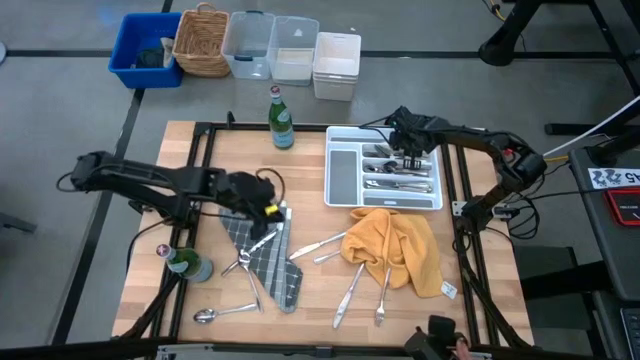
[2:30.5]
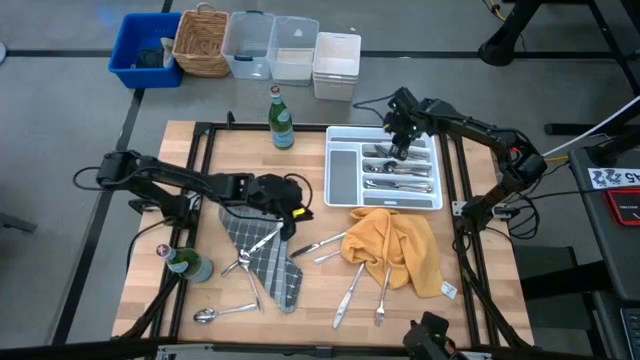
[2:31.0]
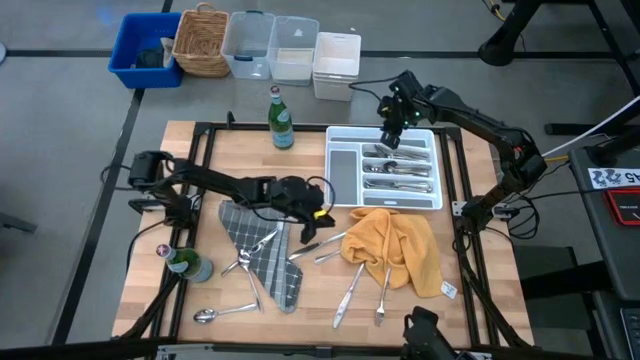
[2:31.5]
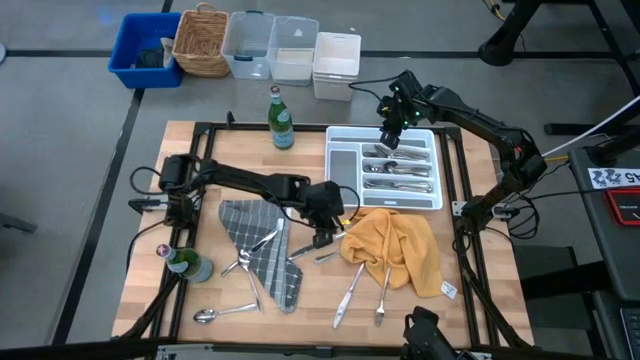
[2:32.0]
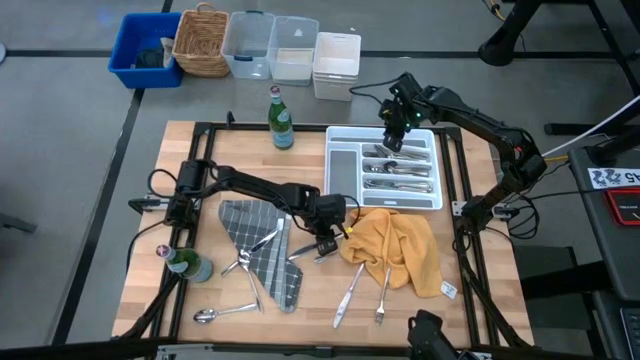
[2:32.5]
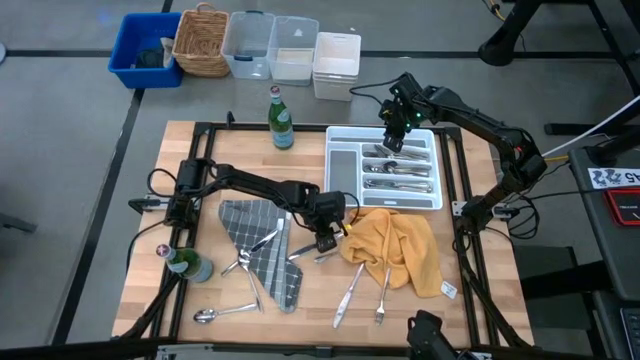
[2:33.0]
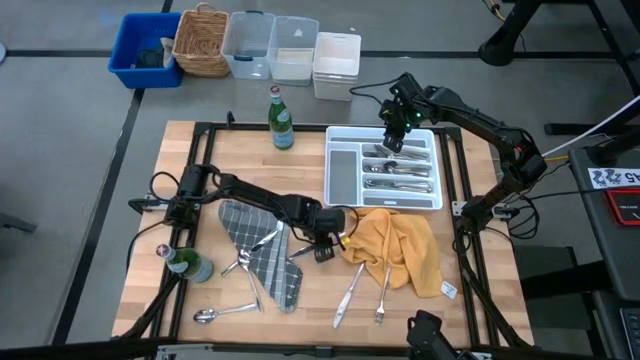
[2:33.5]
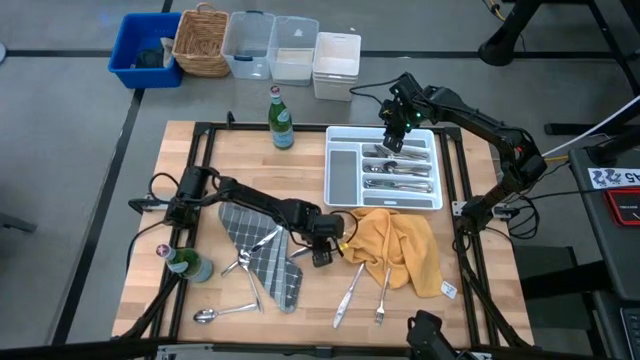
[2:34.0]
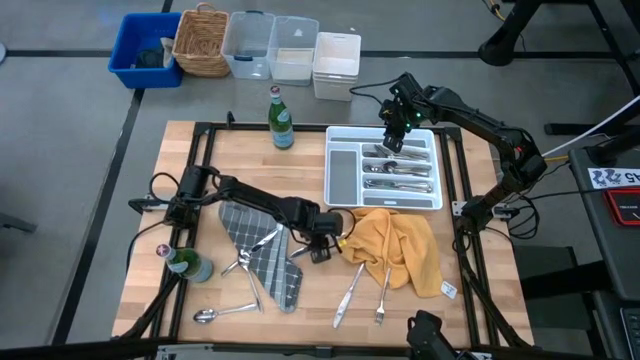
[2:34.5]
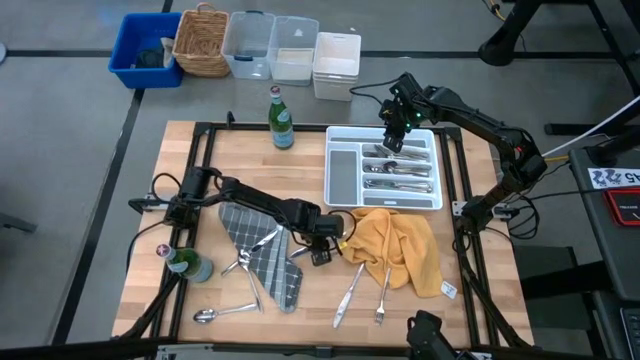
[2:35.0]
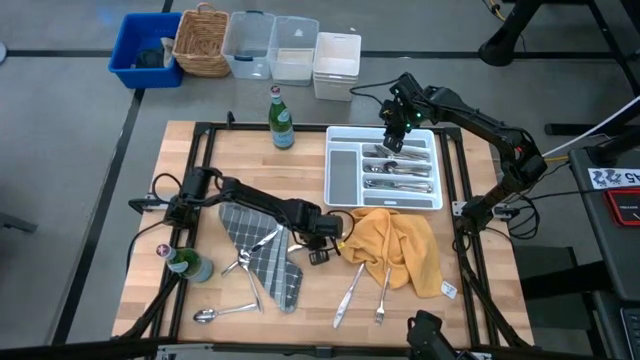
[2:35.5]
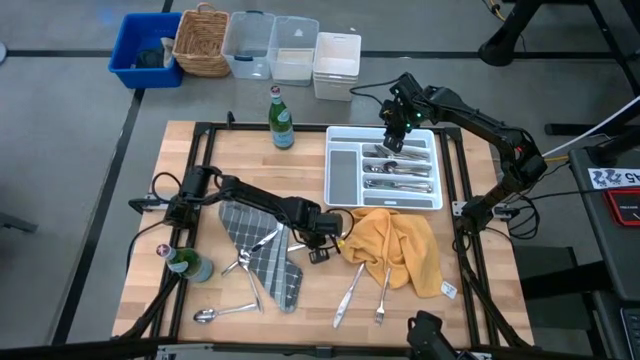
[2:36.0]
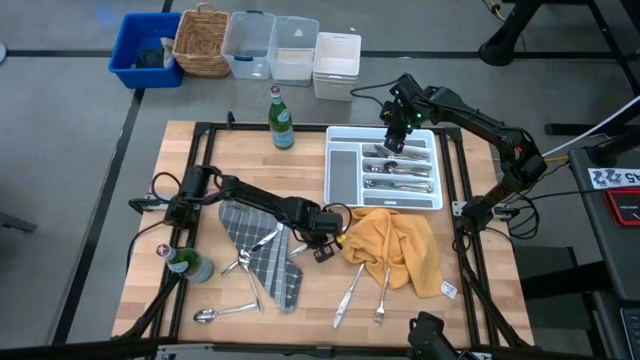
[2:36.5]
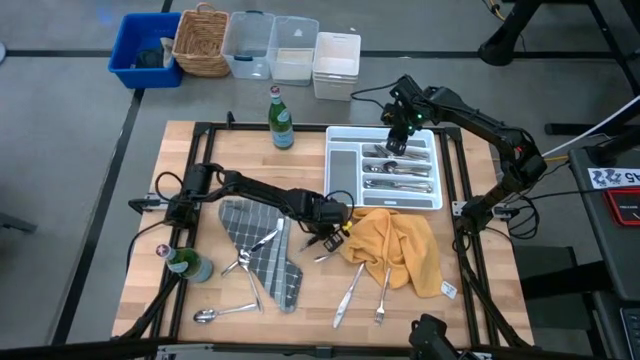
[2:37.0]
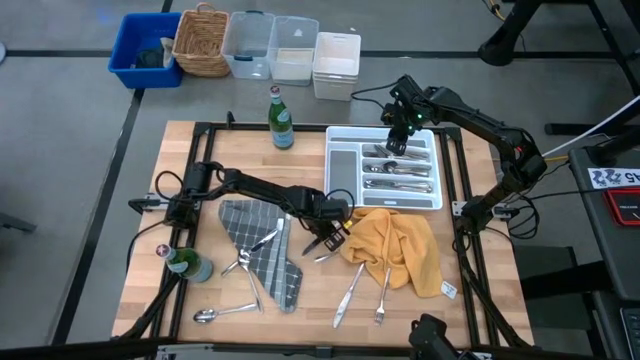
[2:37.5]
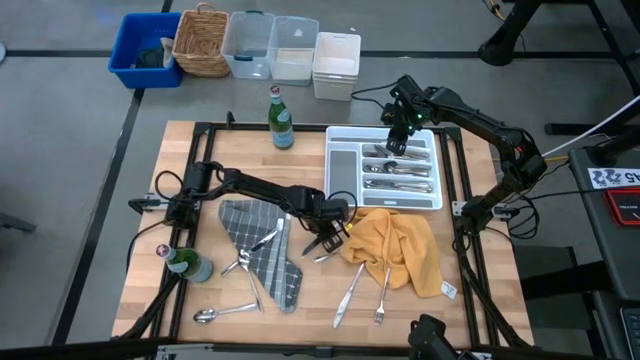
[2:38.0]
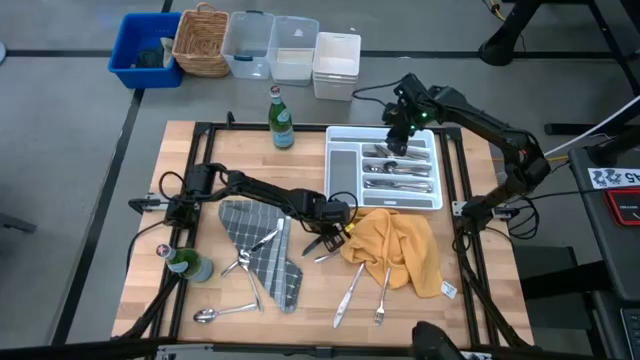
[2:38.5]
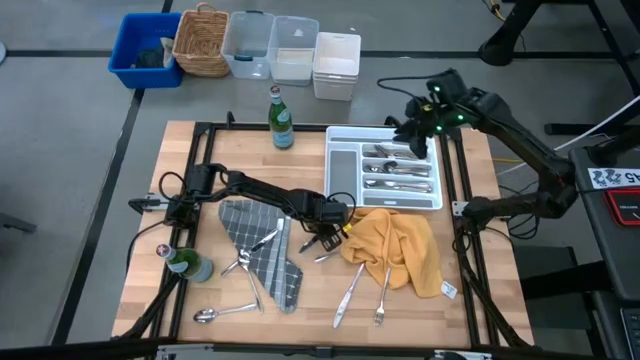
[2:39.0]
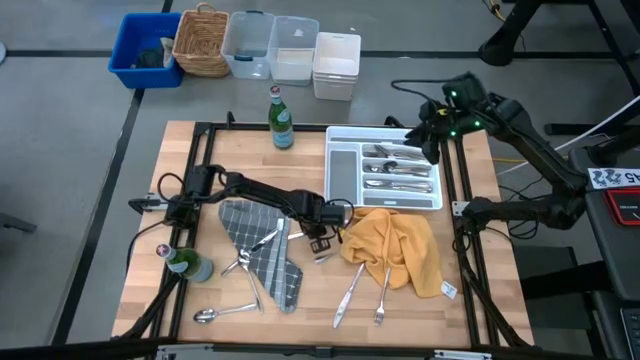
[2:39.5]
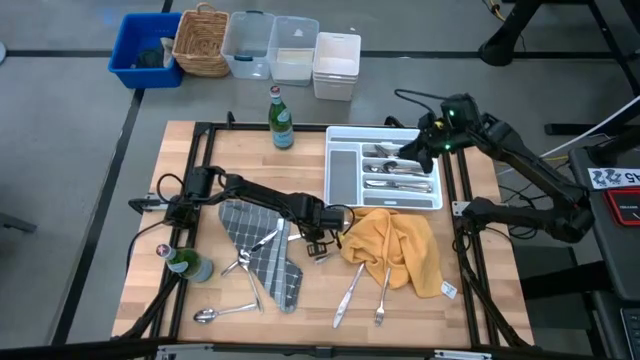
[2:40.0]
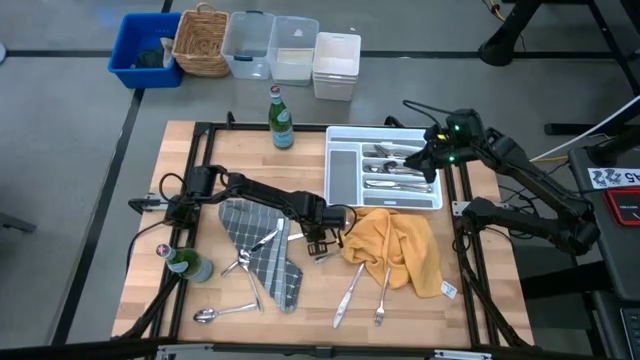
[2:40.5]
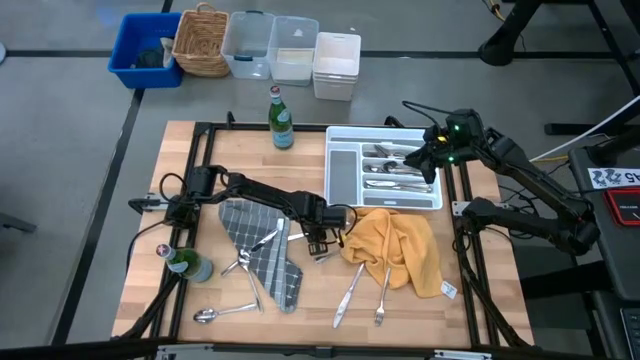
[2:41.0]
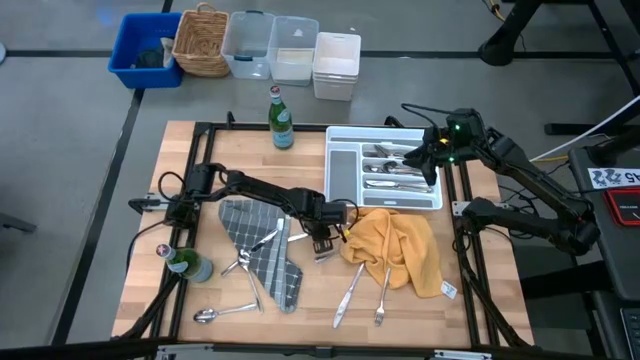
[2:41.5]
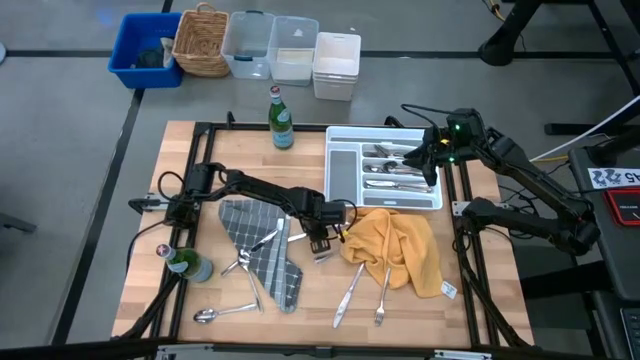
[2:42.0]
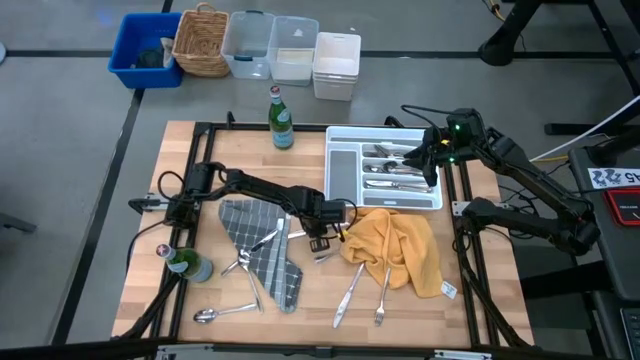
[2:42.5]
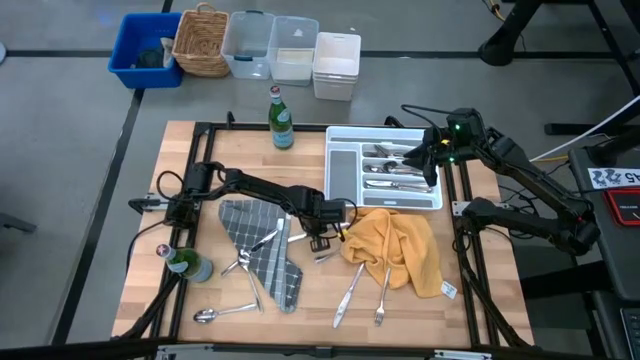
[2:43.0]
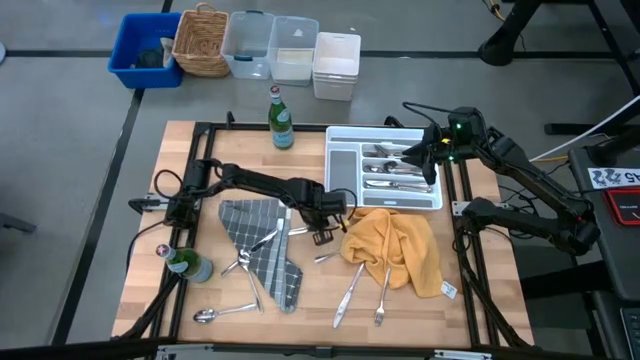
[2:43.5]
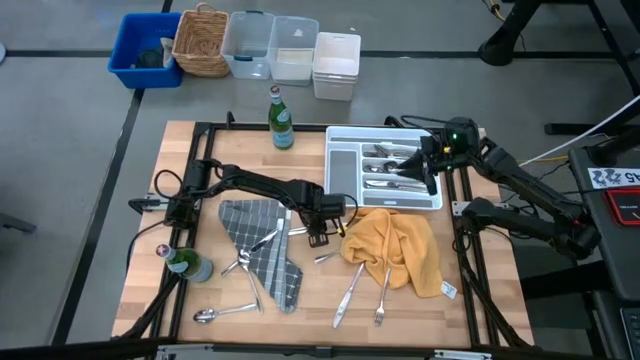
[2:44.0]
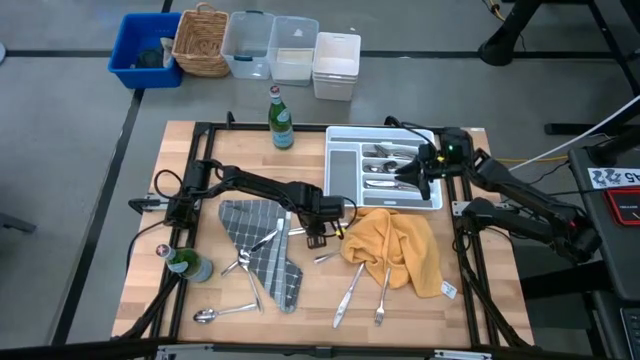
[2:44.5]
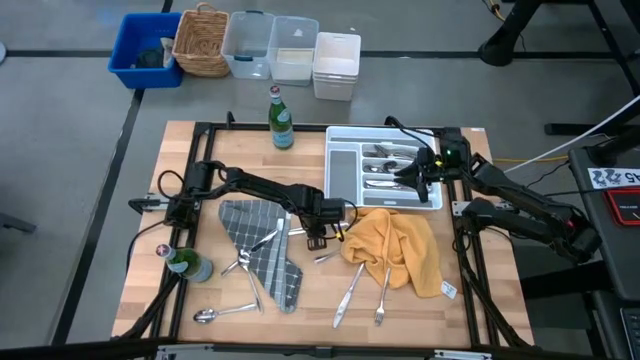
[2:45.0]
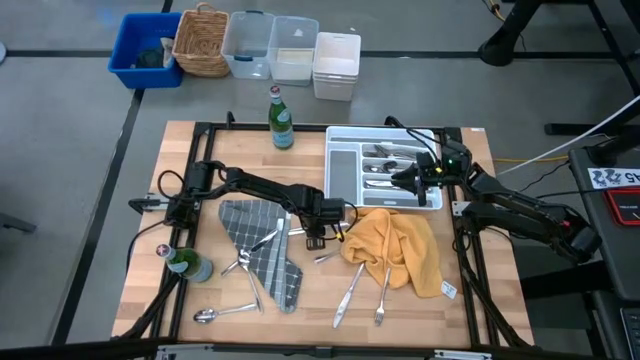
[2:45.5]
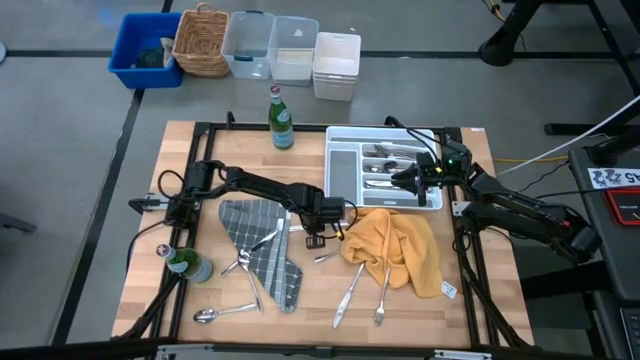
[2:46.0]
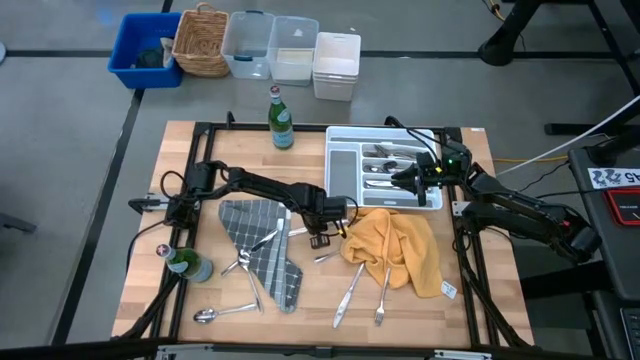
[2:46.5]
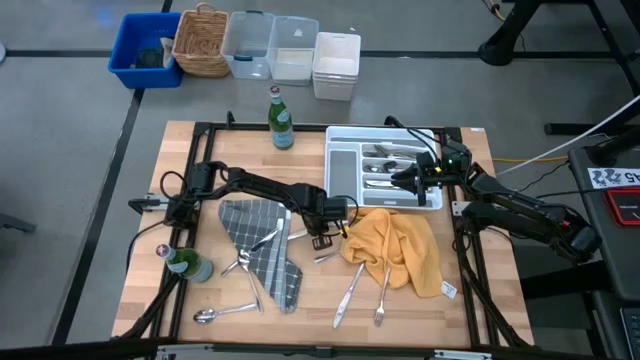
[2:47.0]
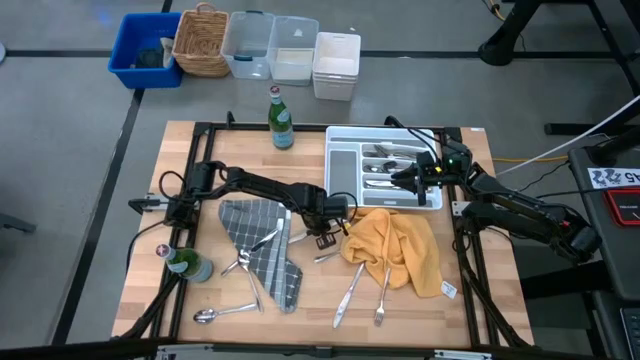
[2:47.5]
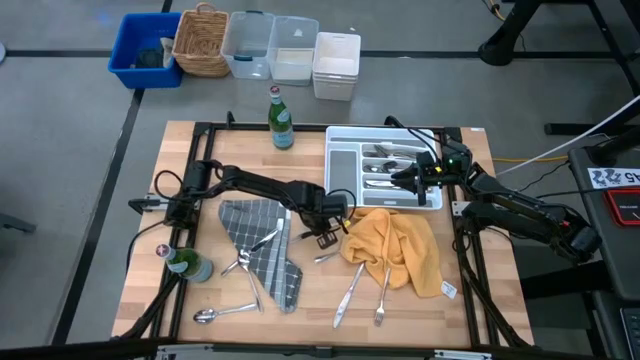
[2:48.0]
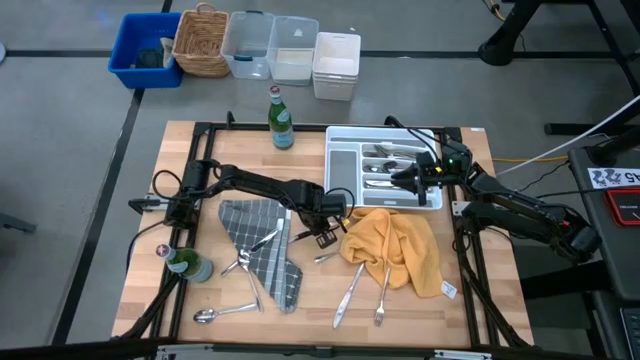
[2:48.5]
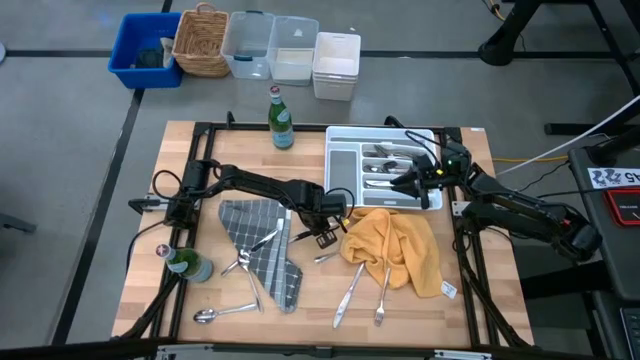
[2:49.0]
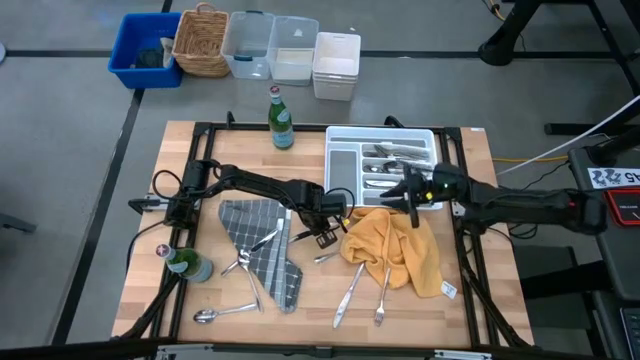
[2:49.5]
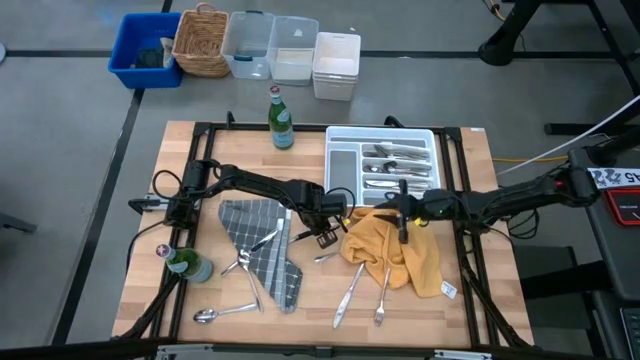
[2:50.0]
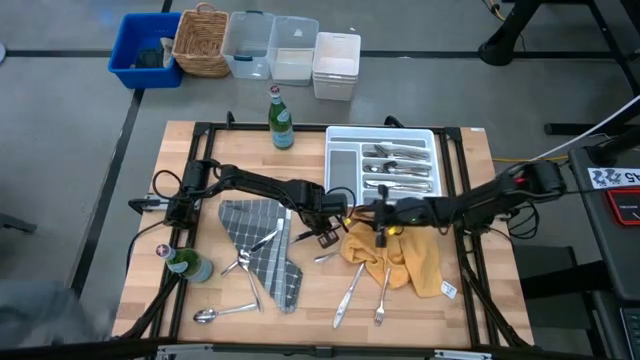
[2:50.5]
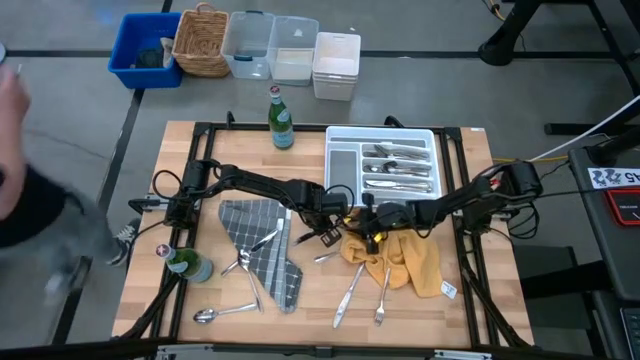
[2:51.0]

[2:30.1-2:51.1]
Put the silver knife into the cutlery tray
